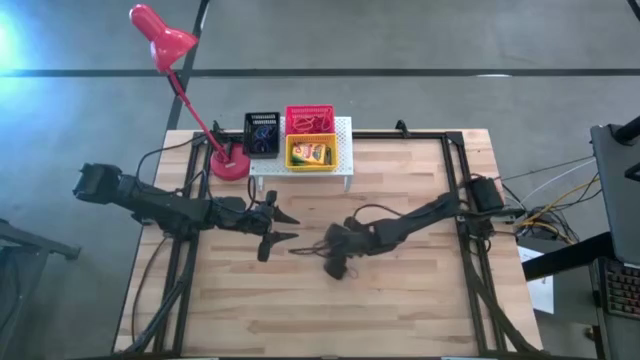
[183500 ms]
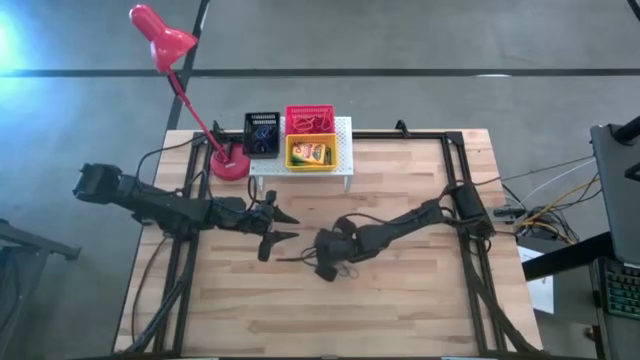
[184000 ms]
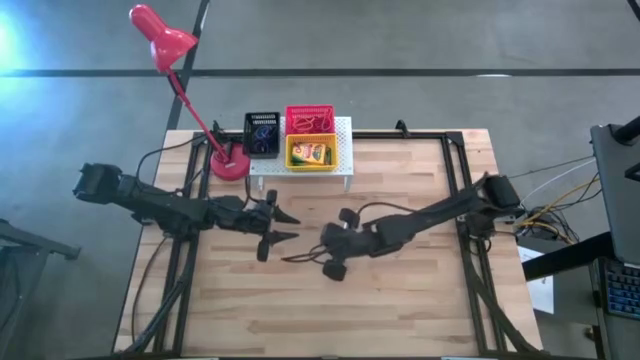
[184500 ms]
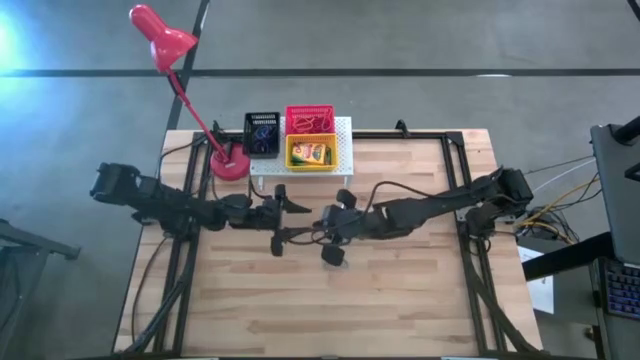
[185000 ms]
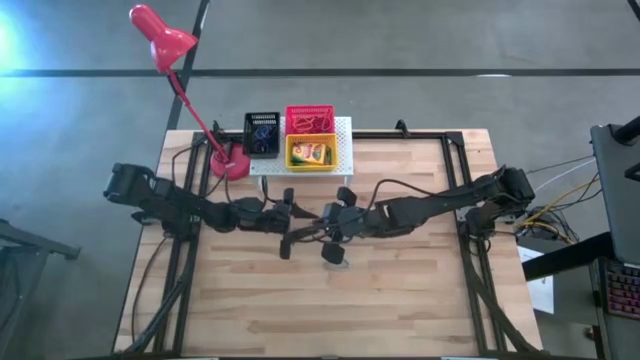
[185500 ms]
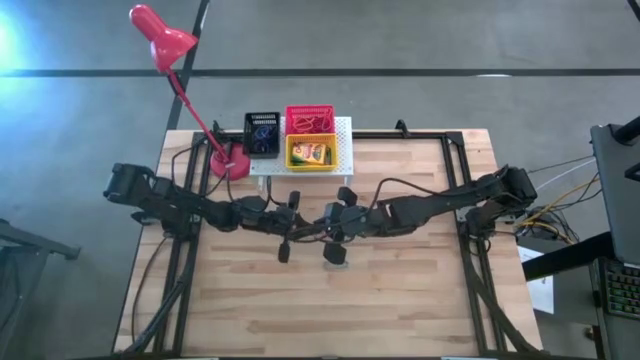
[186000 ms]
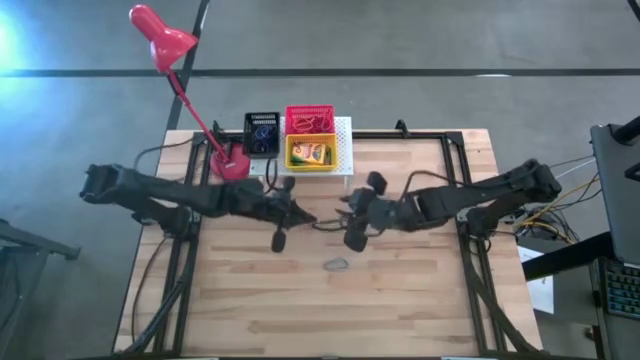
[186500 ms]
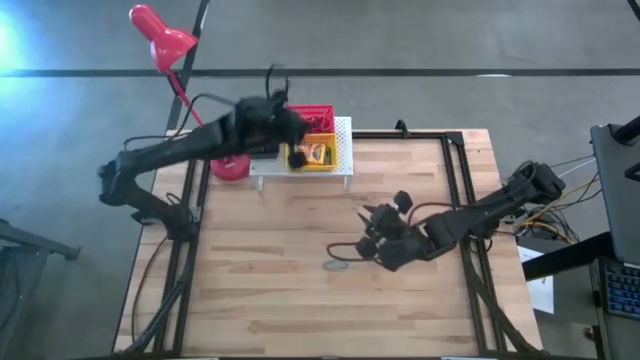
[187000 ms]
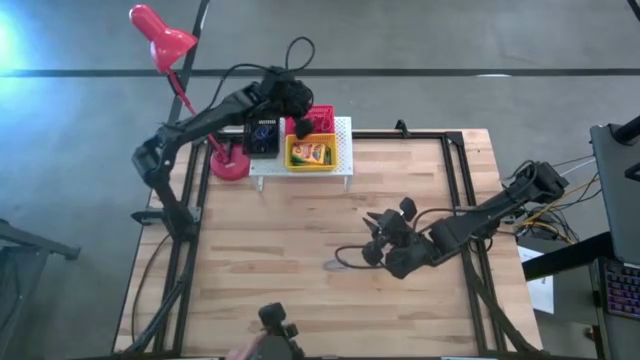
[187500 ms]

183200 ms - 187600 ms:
Task: Pick & Place Office Desk Supplies
Put the red rubber band into the red bin on the shelf

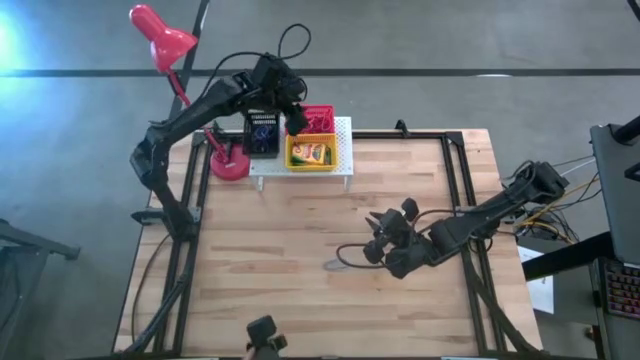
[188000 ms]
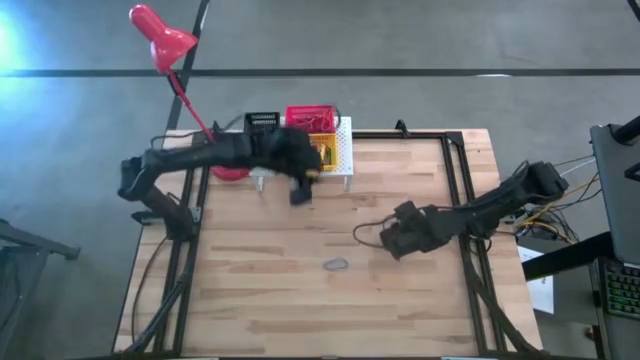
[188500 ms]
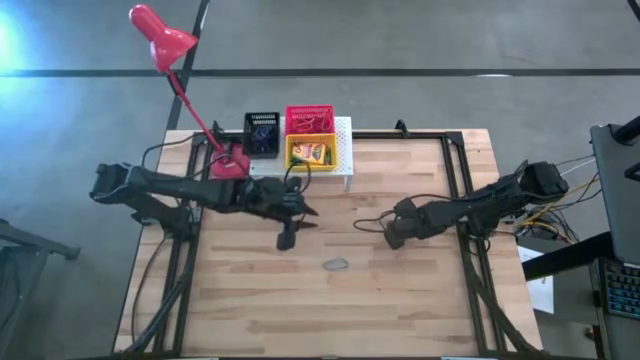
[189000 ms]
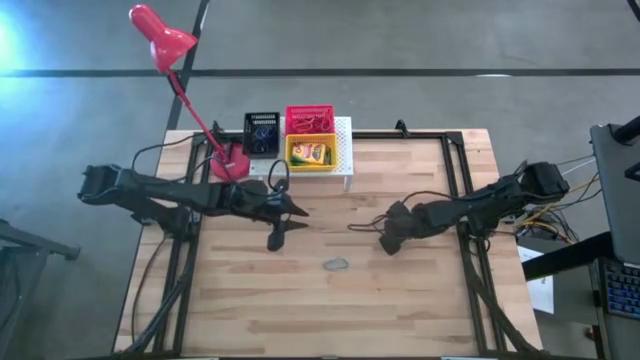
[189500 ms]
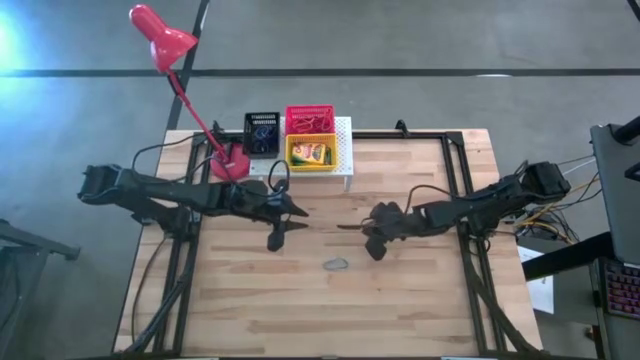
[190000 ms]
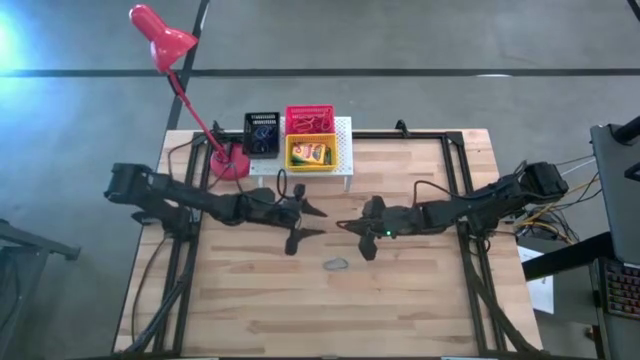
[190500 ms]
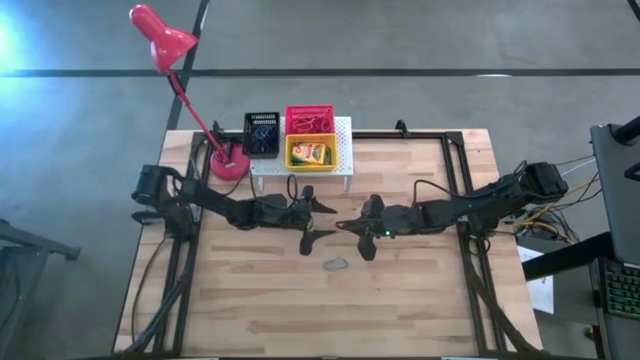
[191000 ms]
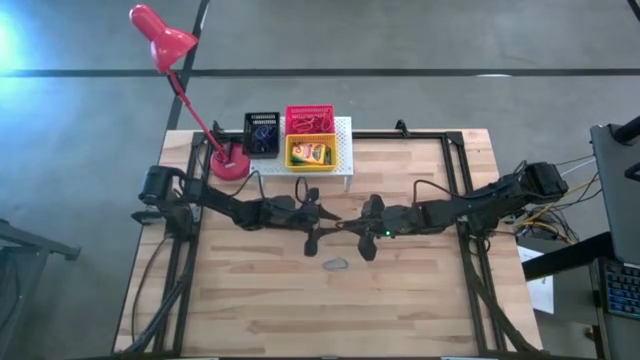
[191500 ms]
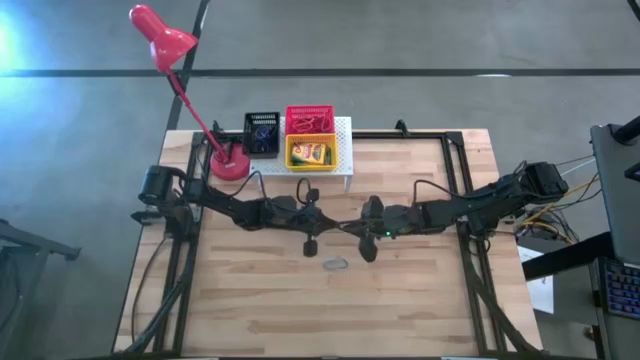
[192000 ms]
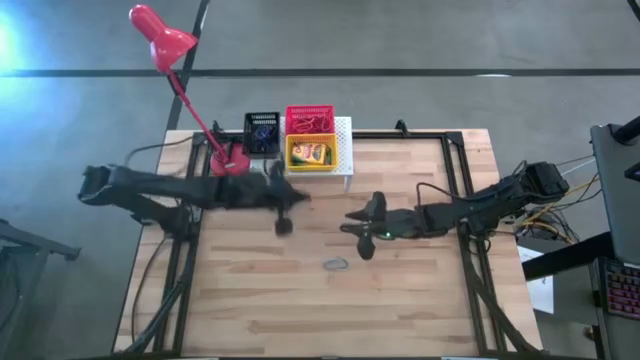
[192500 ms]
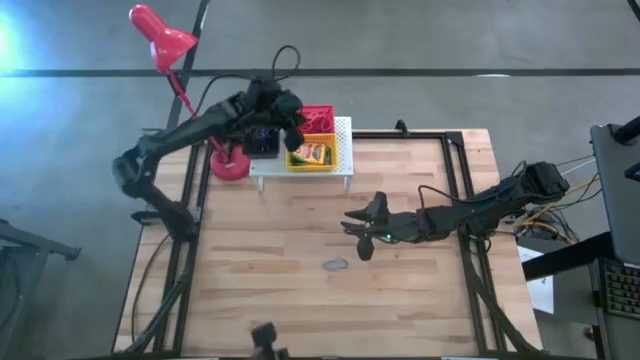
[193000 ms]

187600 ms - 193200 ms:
Put the orange rubber band into the red bin on the shelf

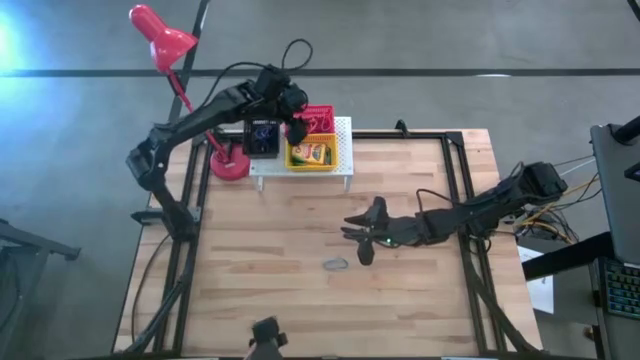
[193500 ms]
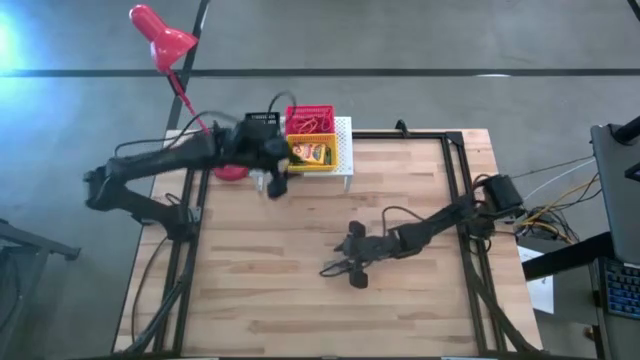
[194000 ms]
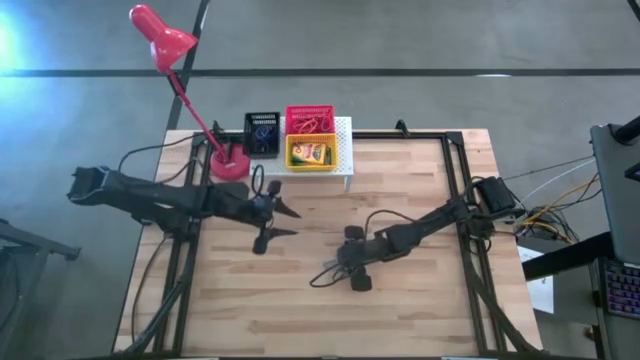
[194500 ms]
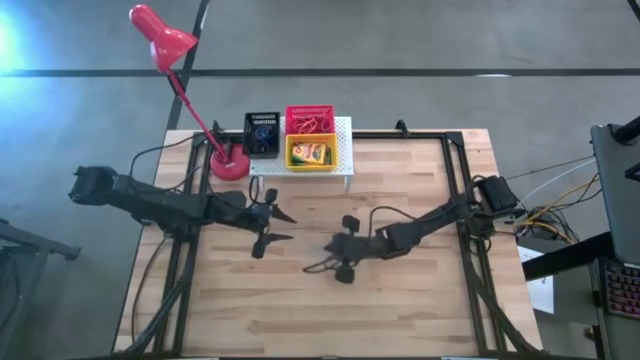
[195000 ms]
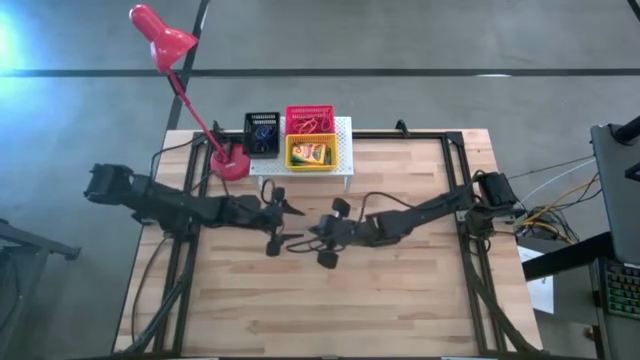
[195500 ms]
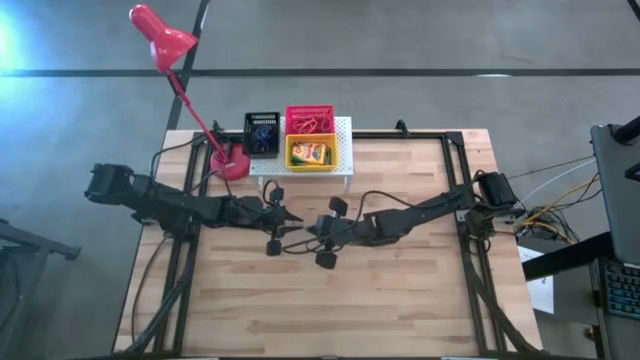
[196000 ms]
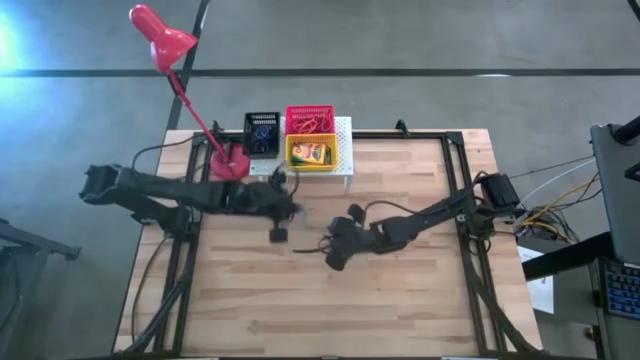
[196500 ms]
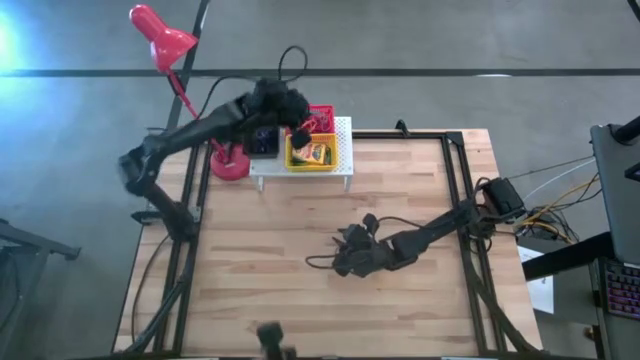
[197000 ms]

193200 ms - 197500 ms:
Put the blue rubber band into the red bin on the shelf

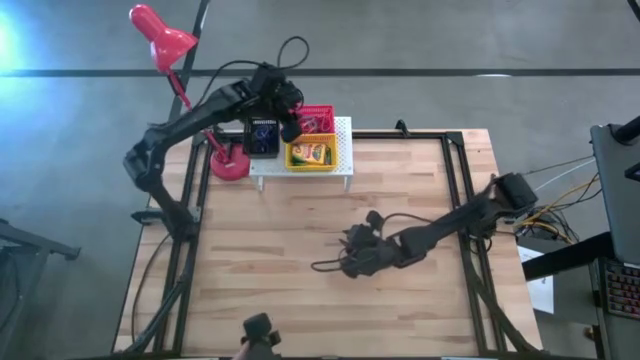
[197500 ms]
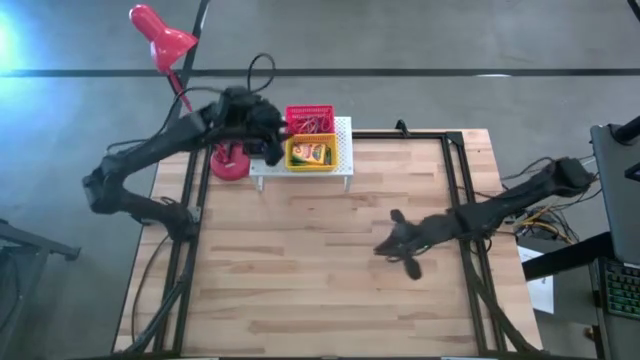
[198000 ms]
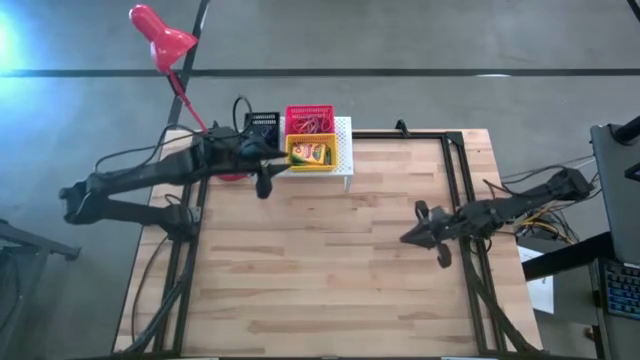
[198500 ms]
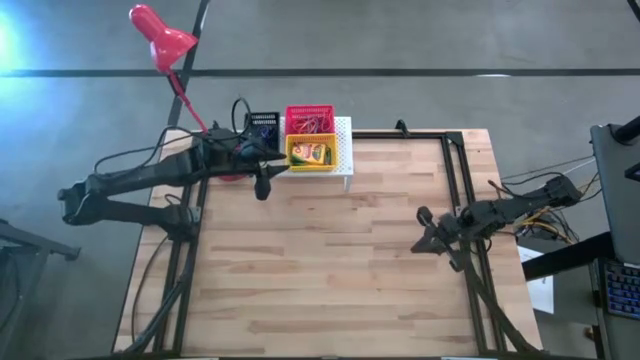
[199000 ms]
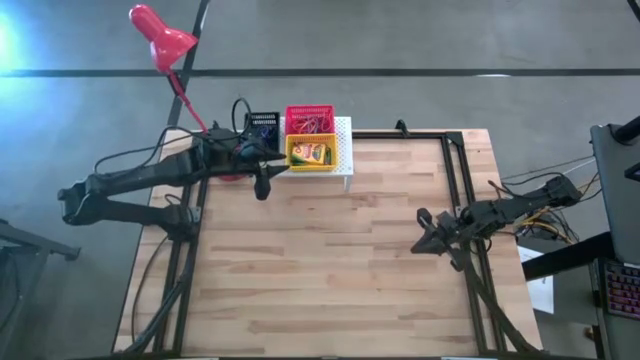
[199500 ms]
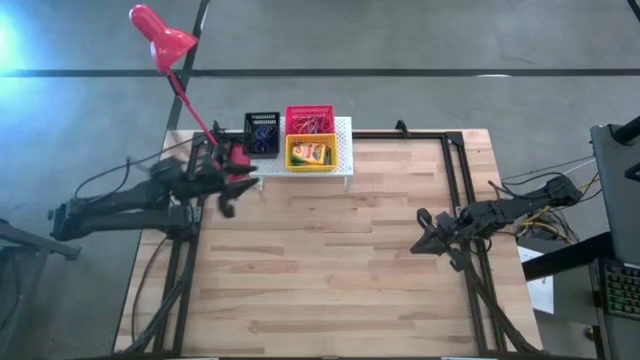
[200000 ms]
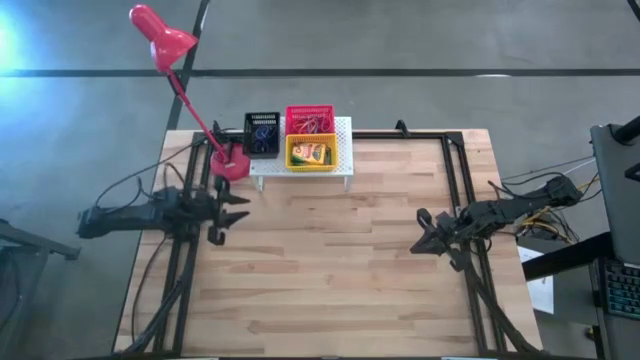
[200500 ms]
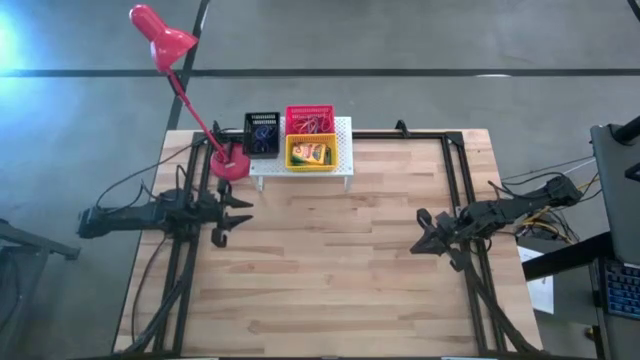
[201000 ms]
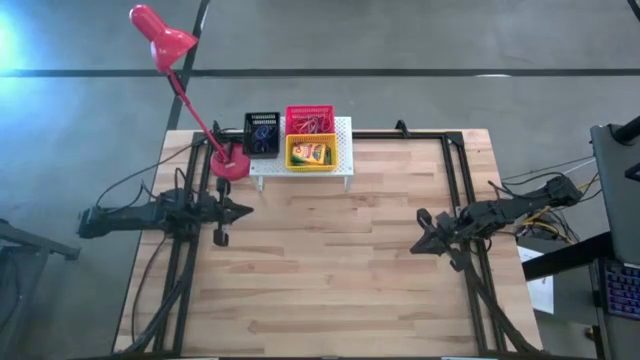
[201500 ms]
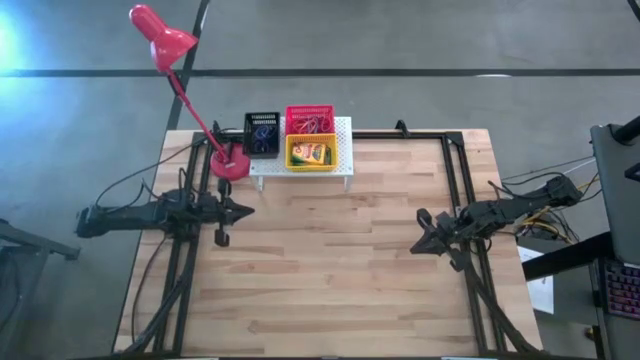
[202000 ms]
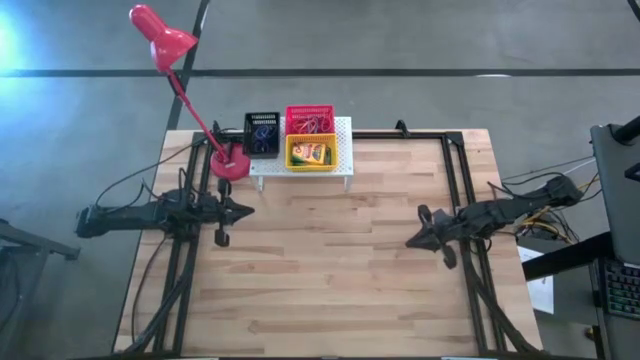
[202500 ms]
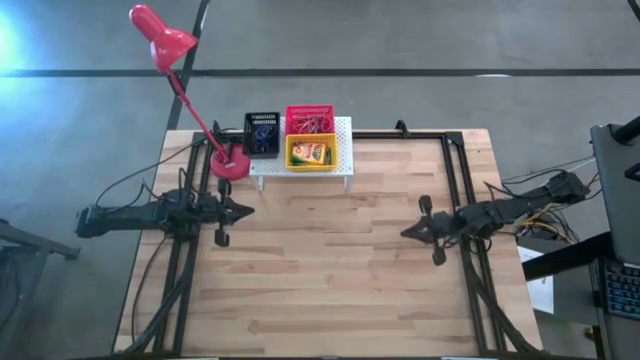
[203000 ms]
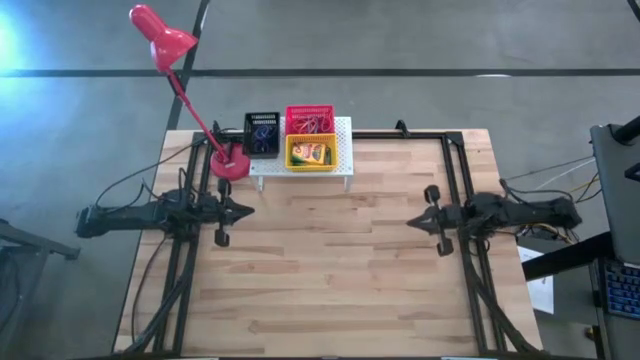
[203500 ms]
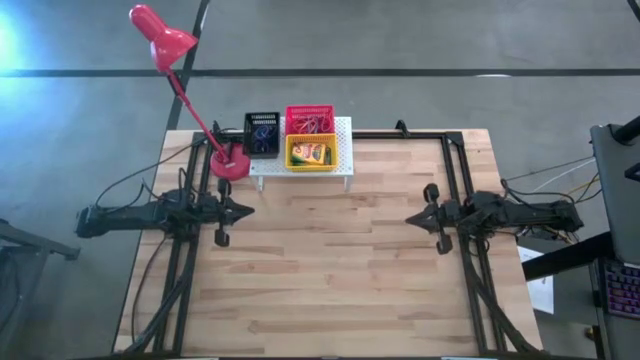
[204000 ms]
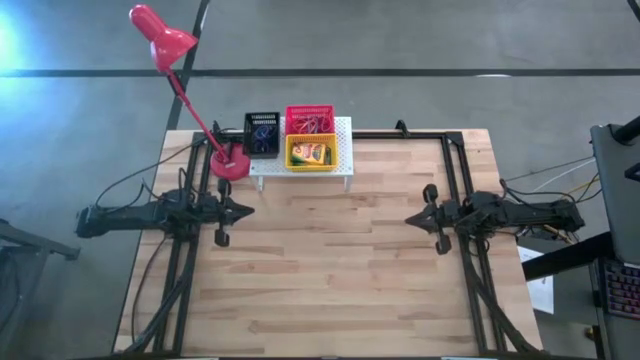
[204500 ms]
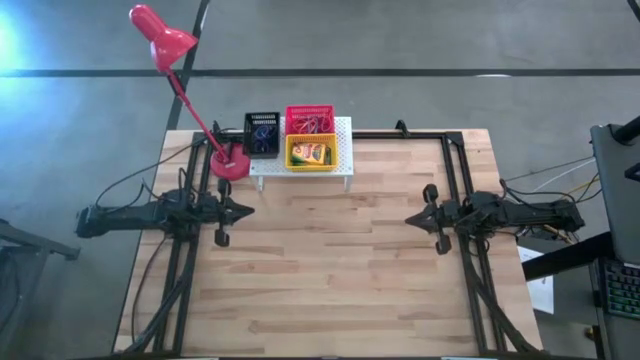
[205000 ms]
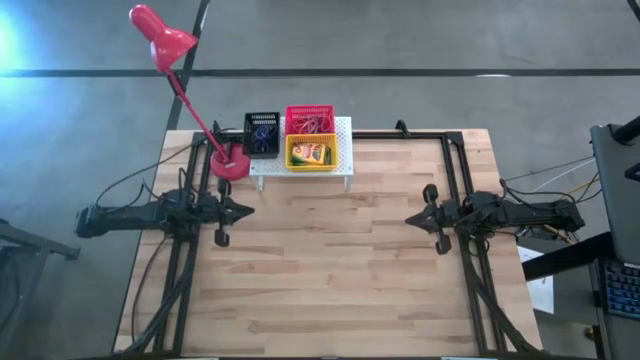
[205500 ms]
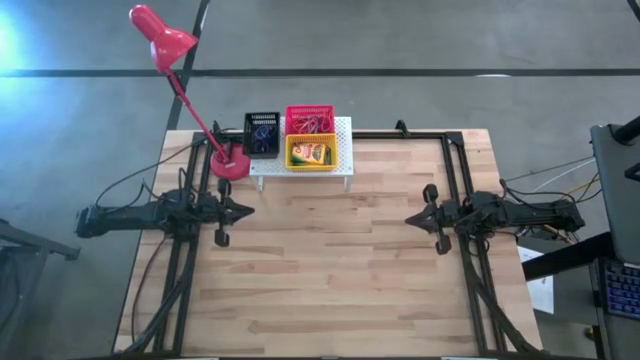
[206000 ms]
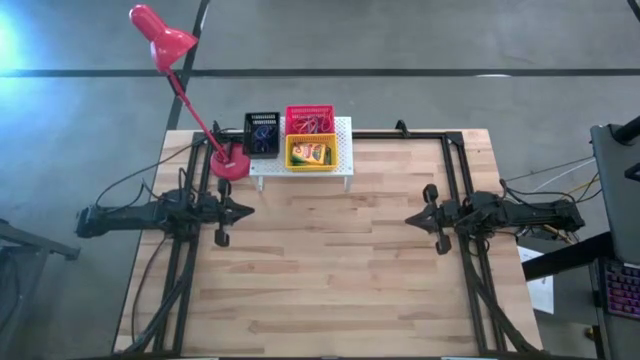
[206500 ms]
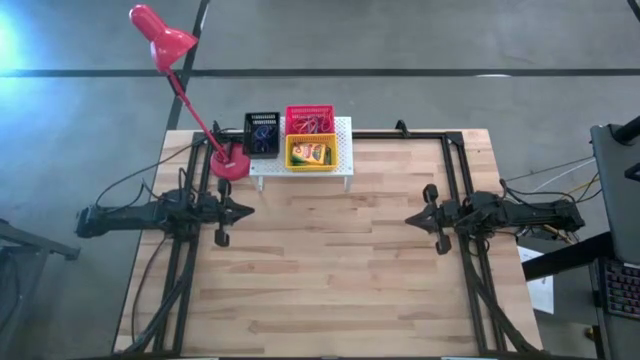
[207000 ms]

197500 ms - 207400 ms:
Return to Home Position
